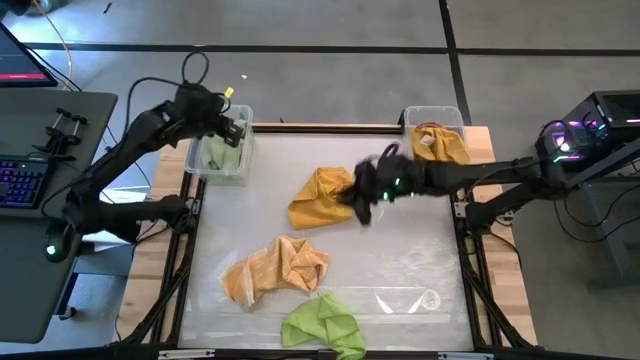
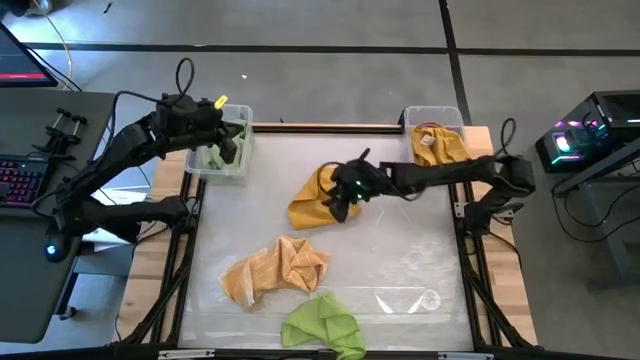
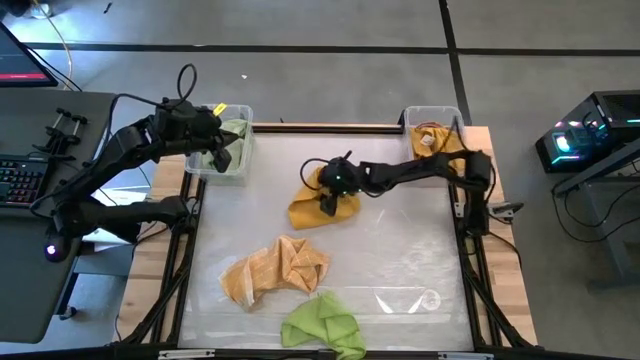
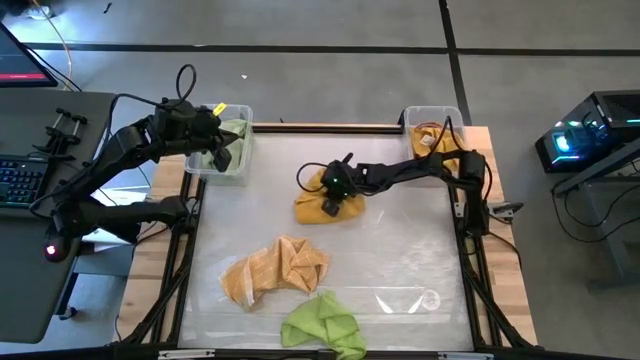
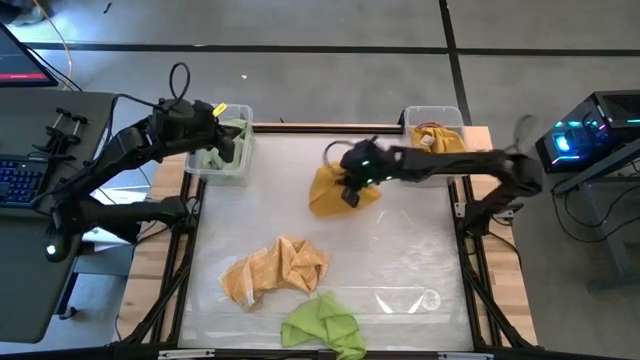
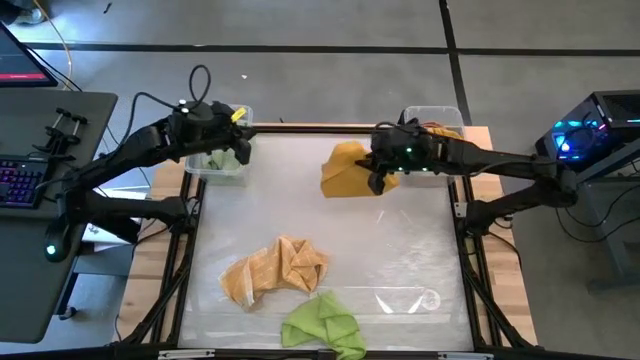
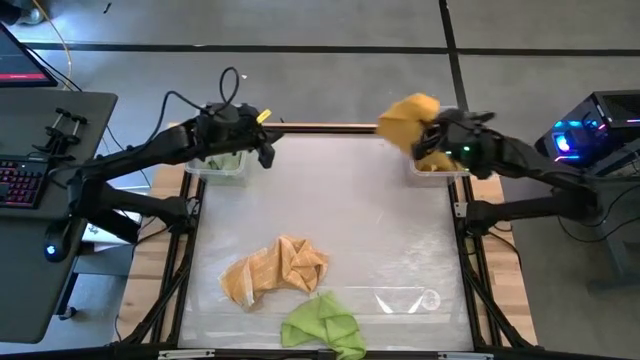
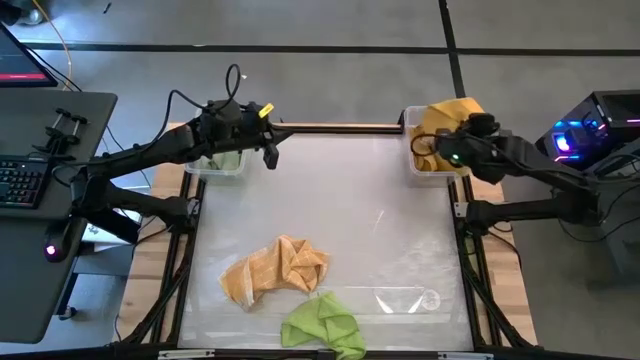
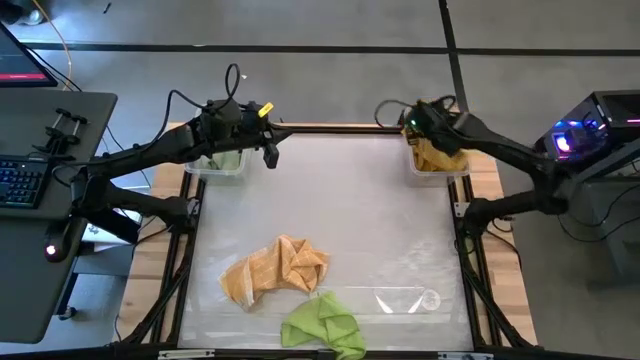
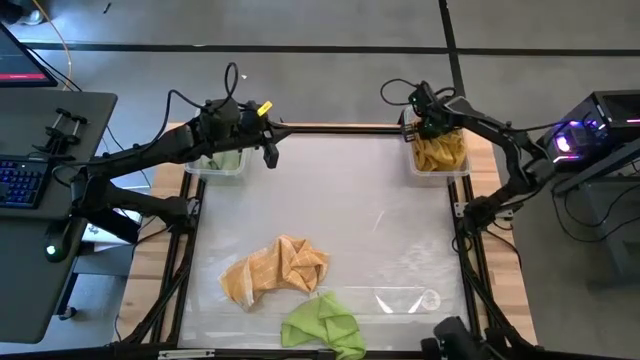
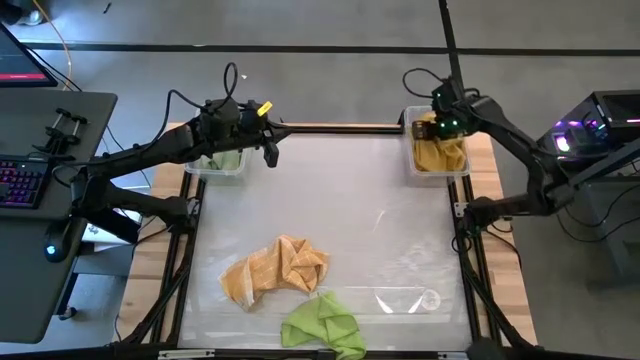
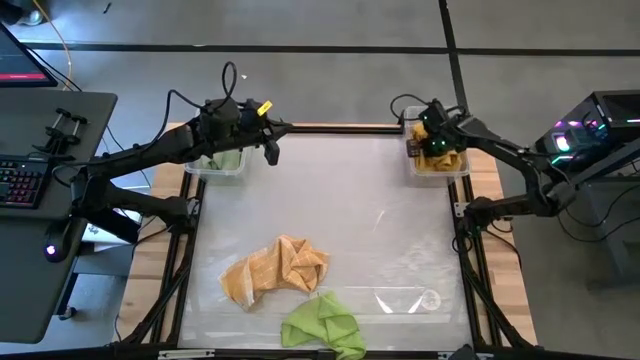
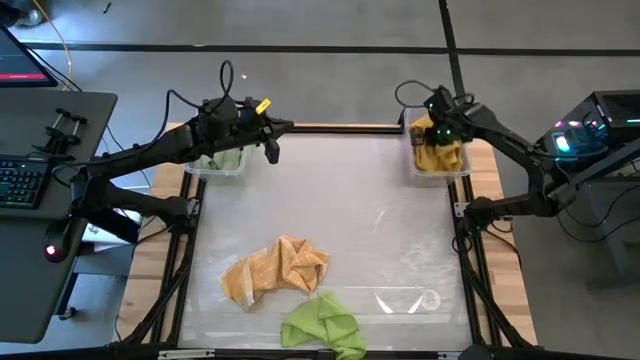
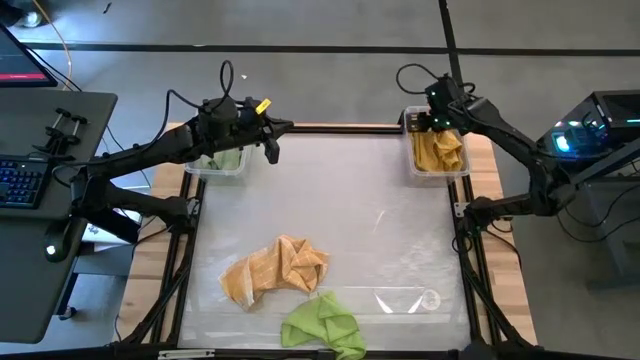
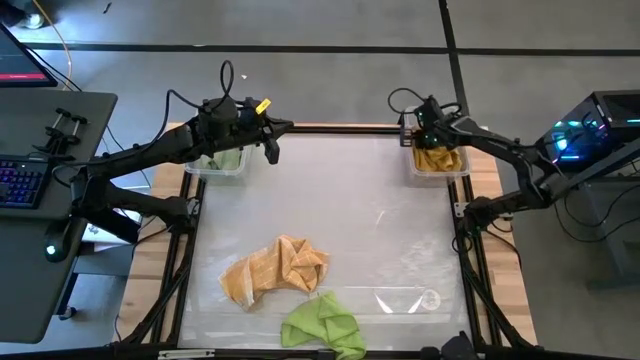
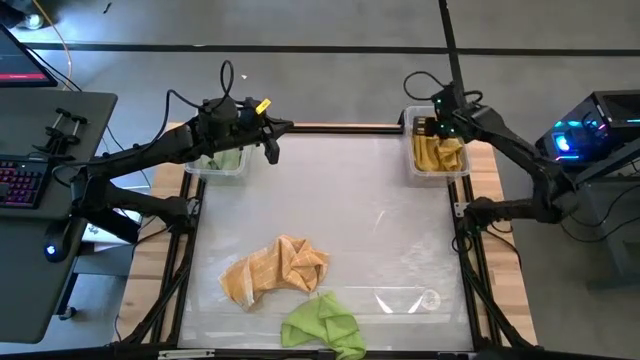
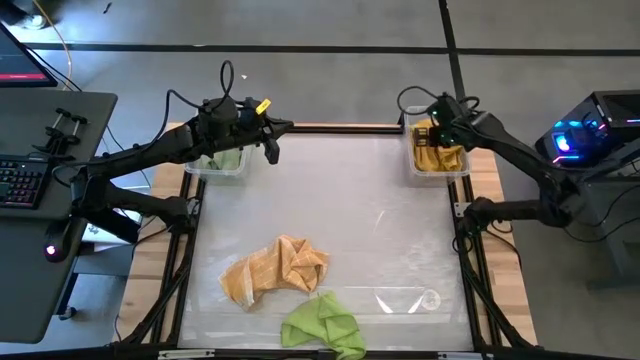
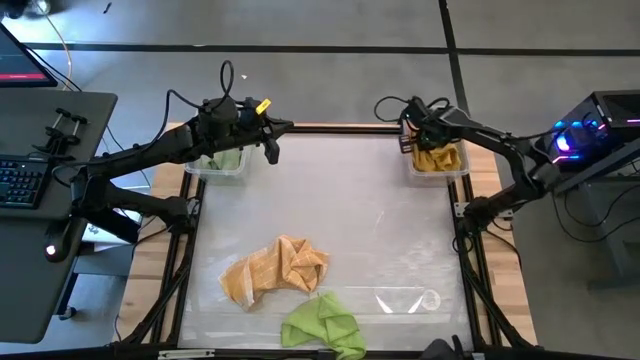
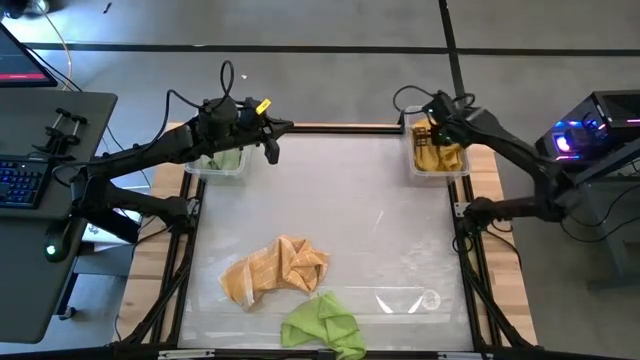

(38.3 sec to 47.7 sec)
Task: Sort towels by color in basket
Put the yellow kitchen towel into the right transparent bin

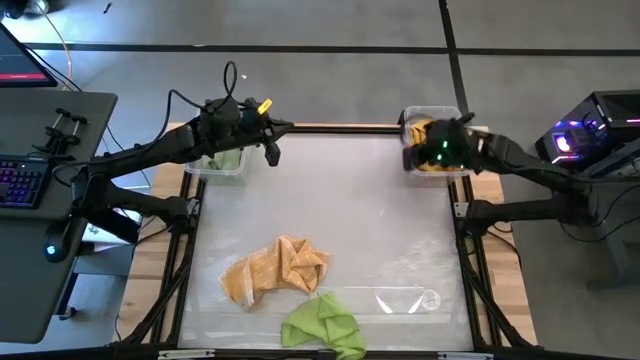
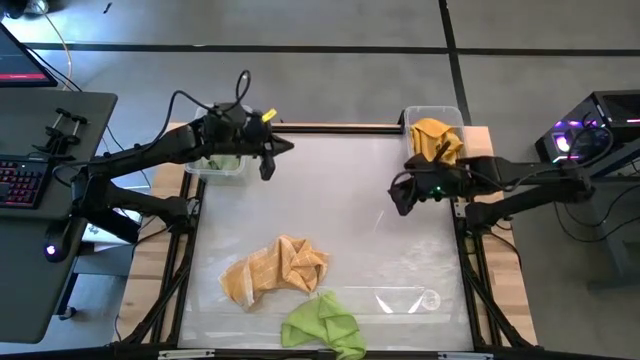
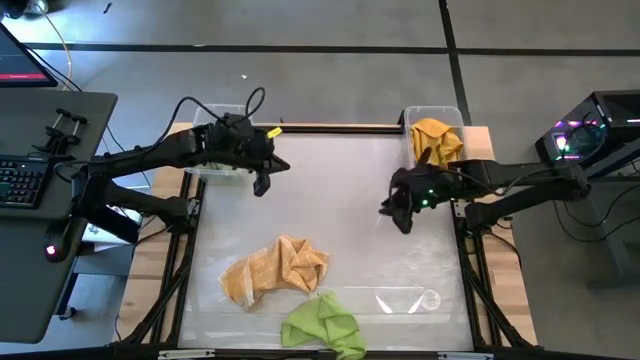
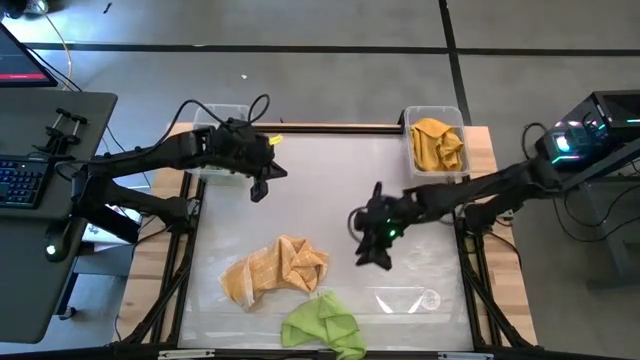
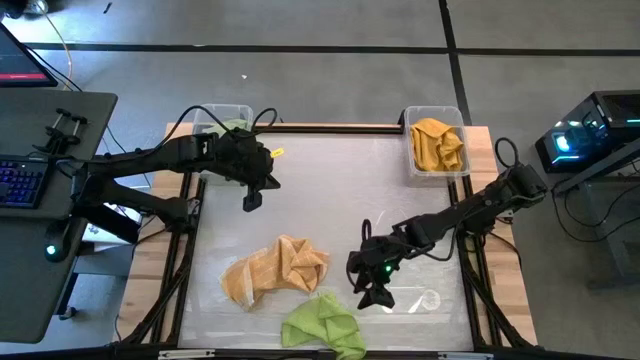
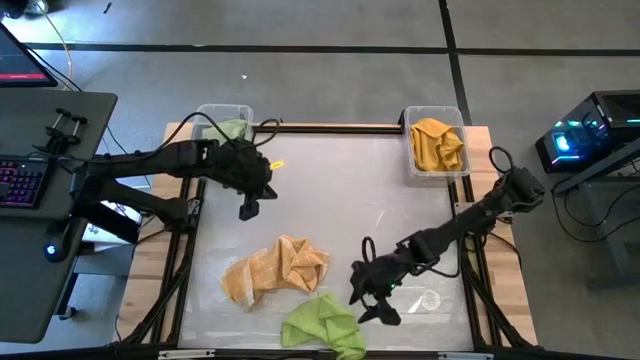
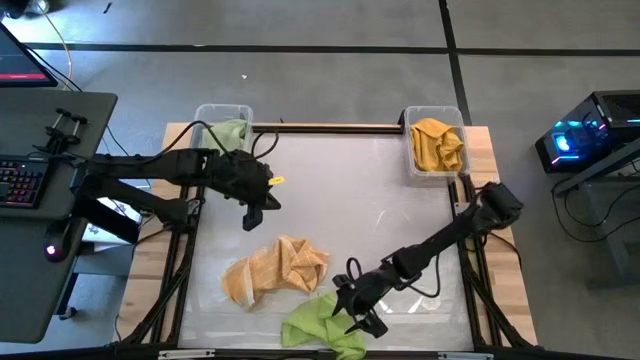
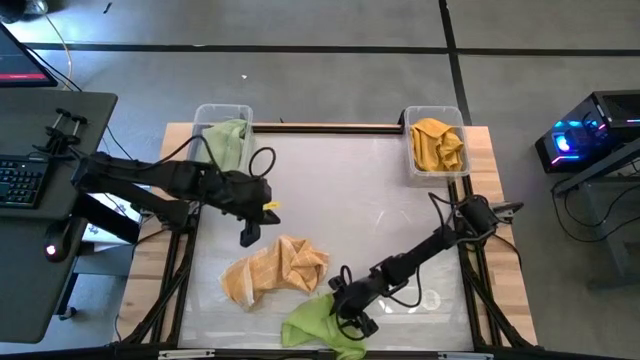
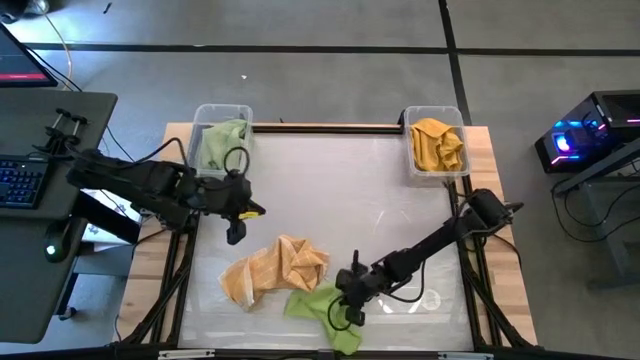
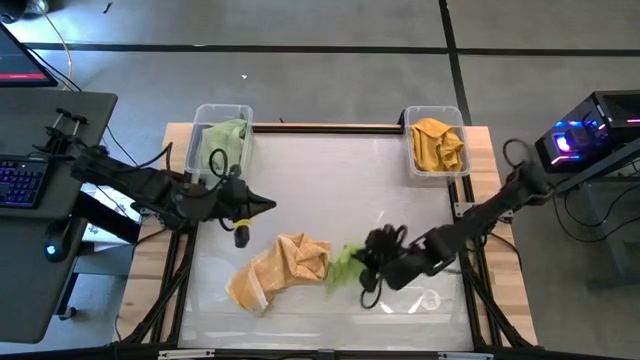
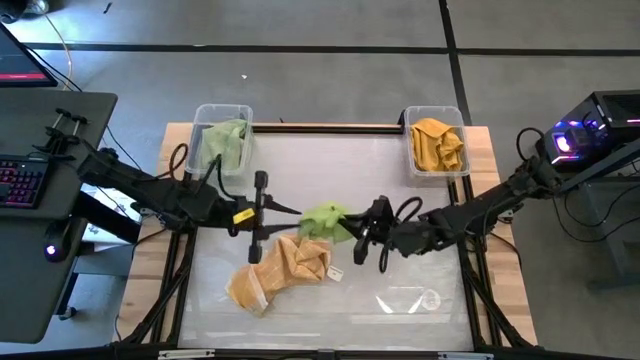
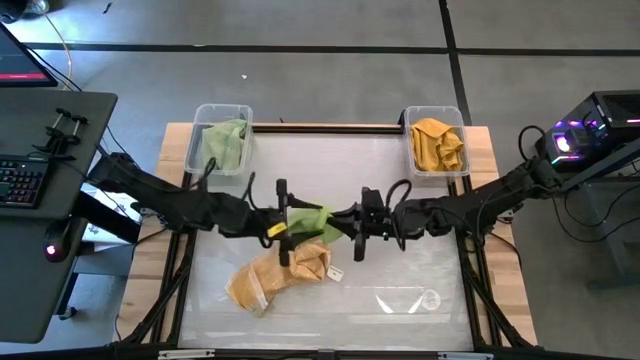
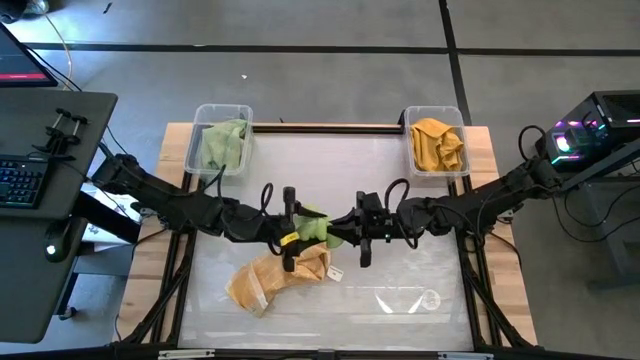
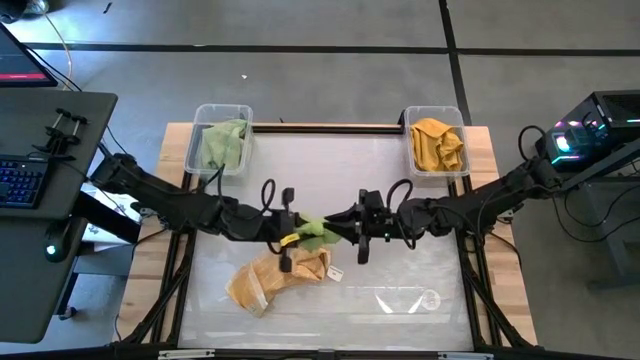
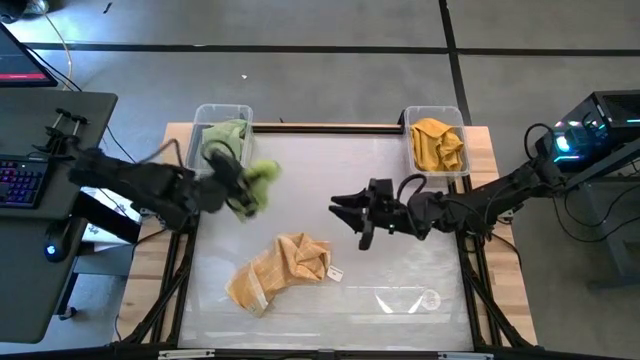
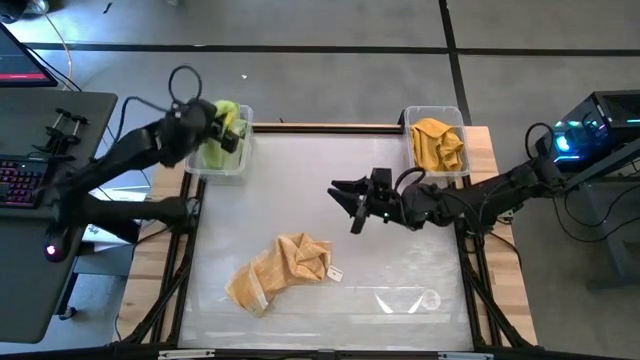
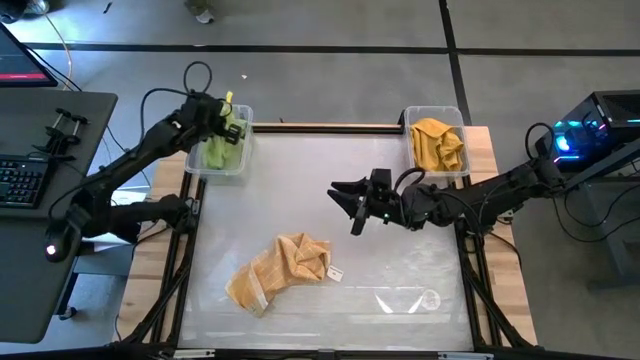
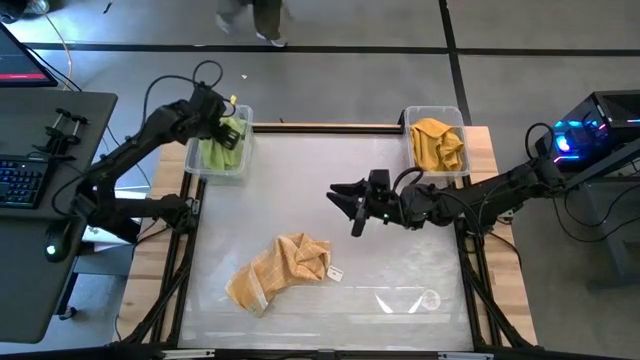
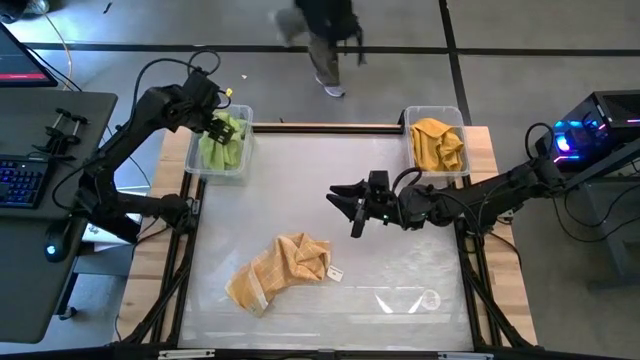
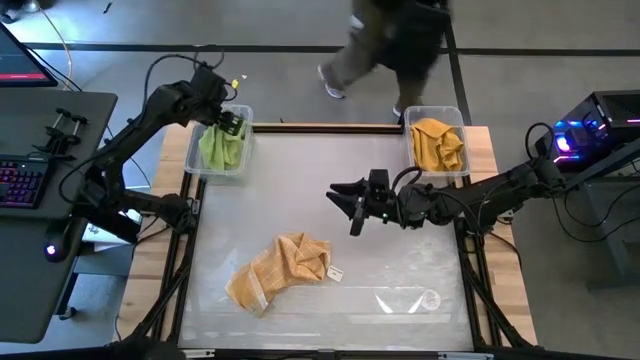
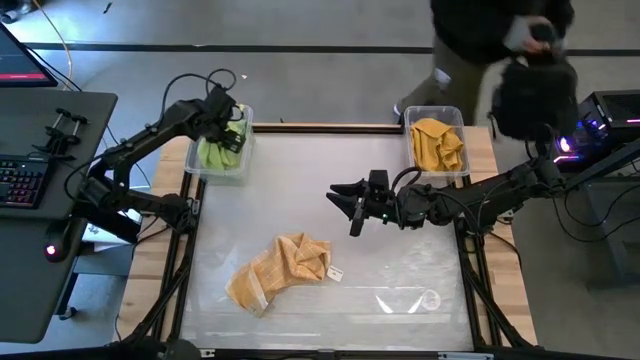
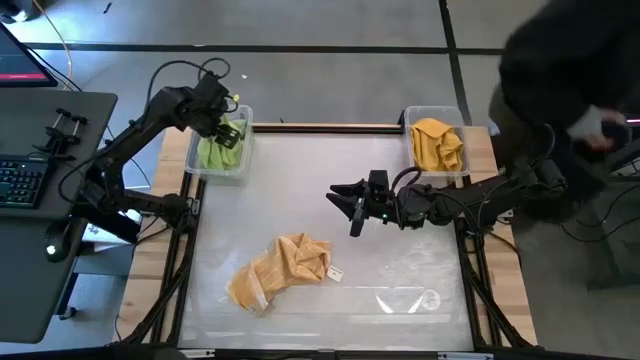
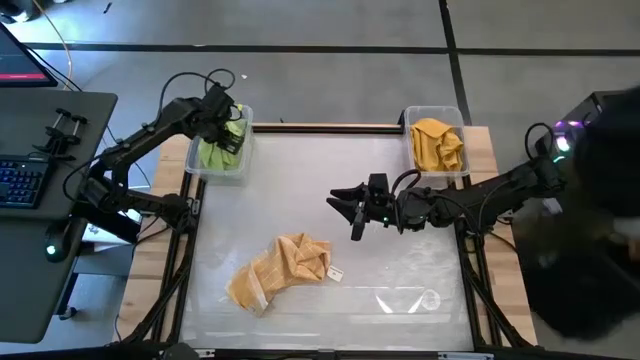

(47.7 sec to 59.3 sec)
Put the light green microfiber towel into the left transparent bin
